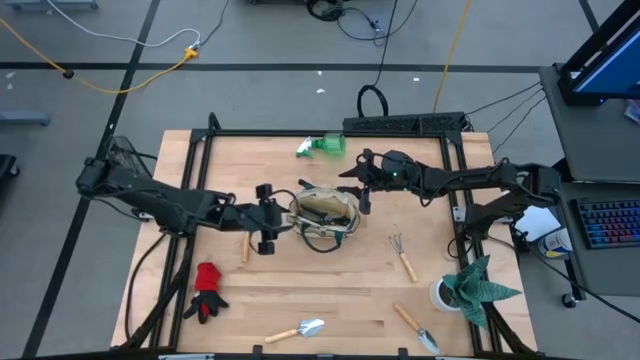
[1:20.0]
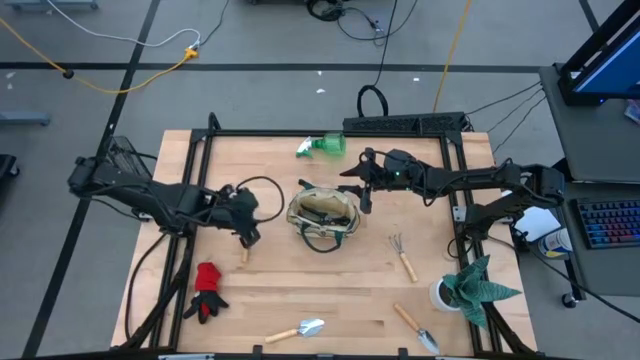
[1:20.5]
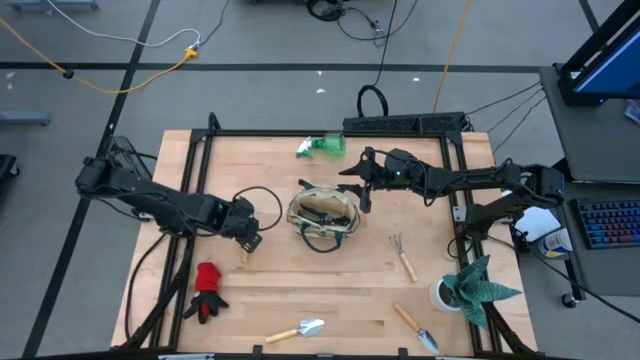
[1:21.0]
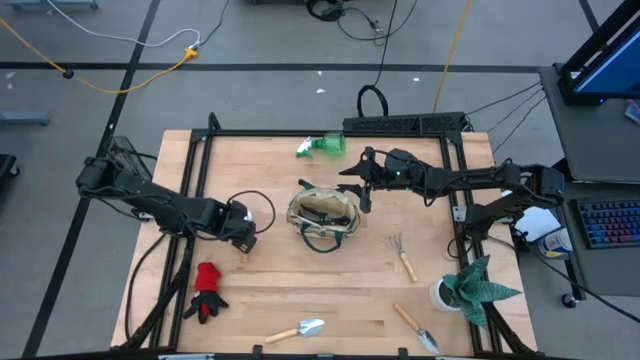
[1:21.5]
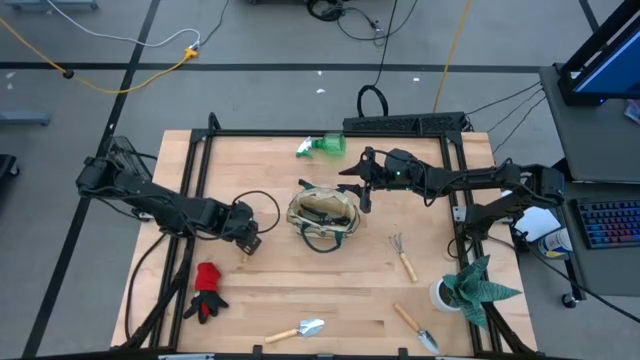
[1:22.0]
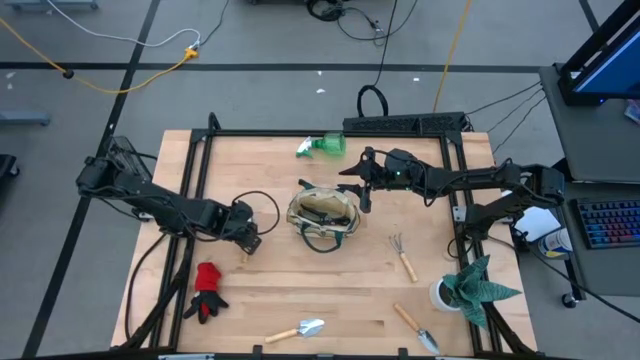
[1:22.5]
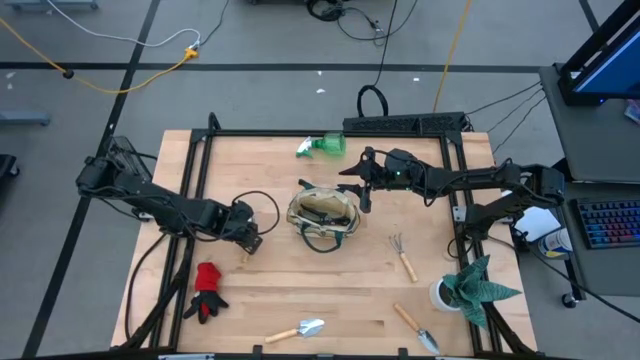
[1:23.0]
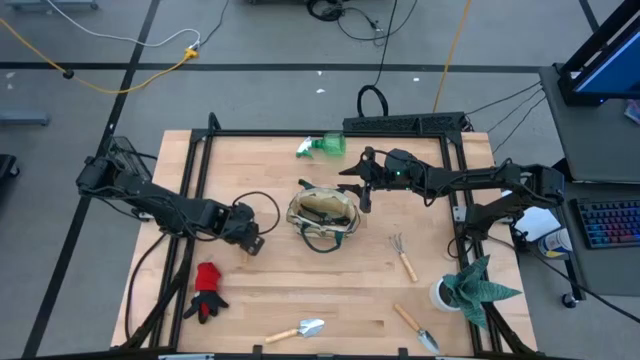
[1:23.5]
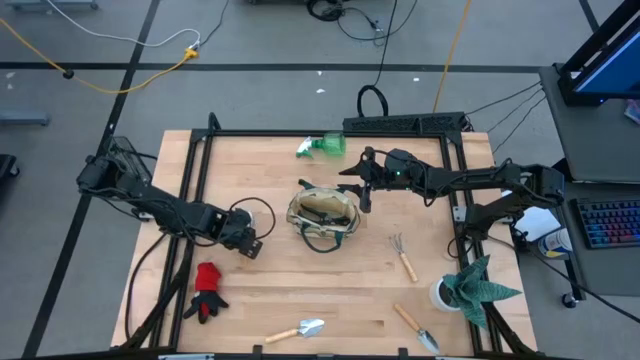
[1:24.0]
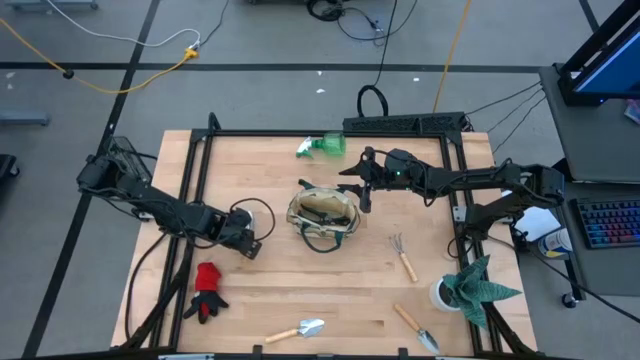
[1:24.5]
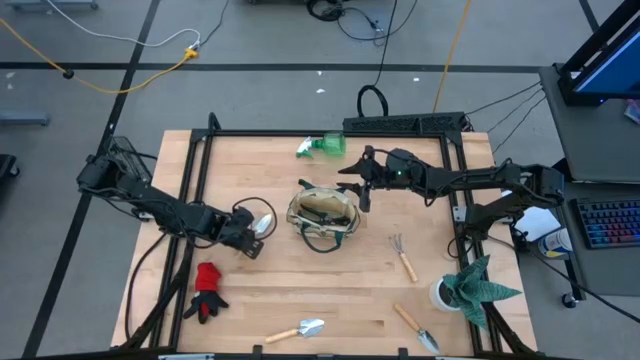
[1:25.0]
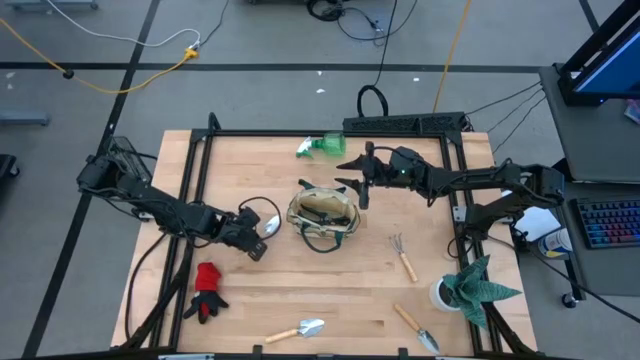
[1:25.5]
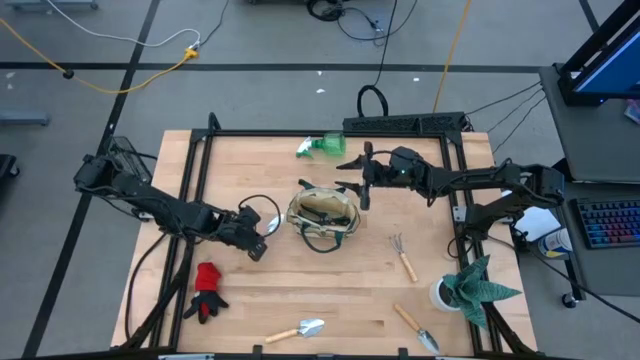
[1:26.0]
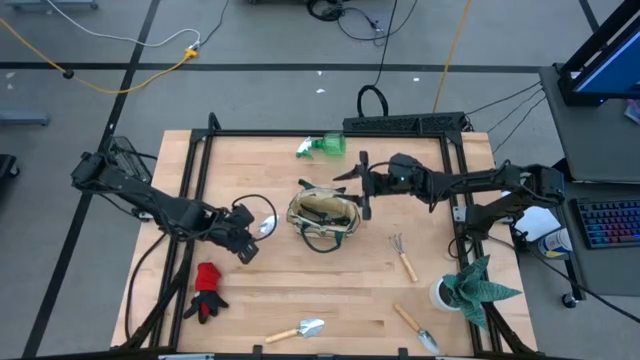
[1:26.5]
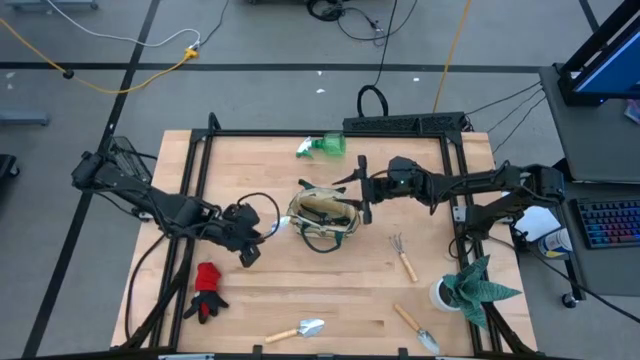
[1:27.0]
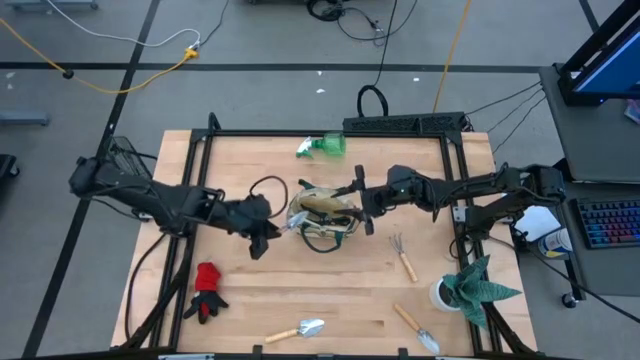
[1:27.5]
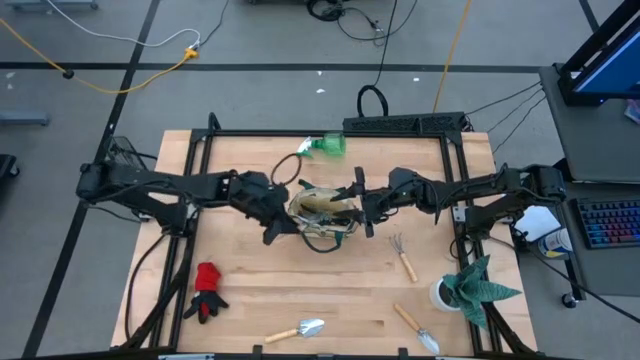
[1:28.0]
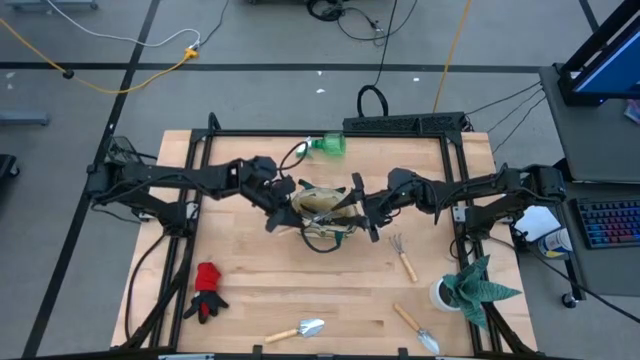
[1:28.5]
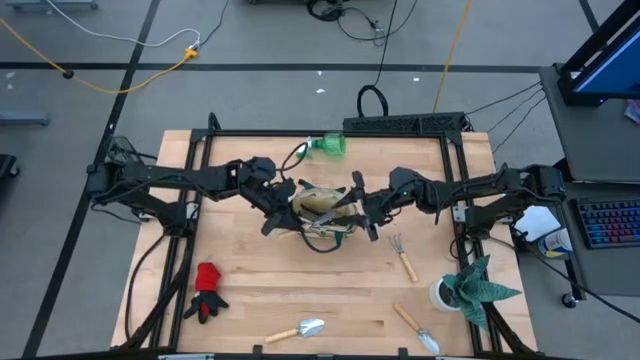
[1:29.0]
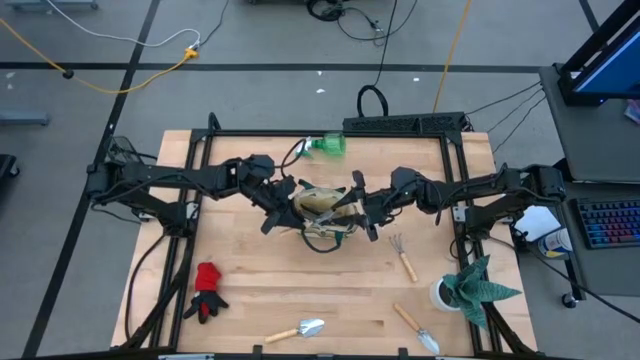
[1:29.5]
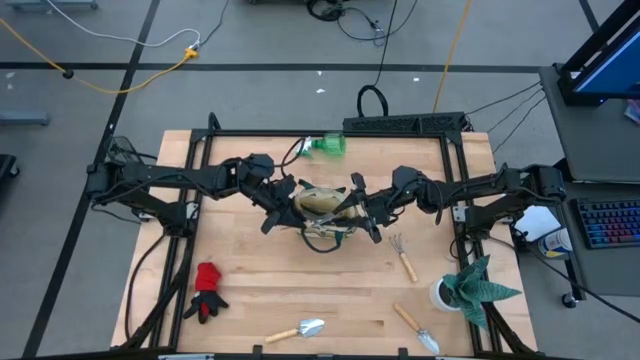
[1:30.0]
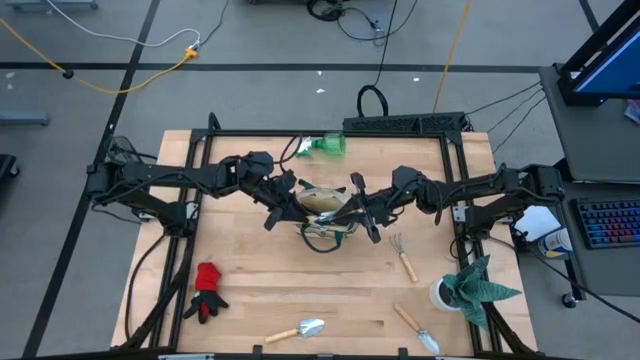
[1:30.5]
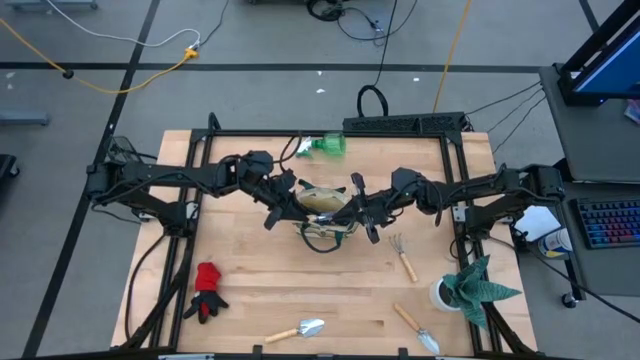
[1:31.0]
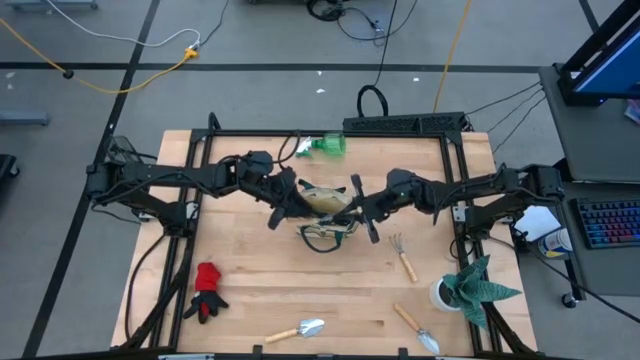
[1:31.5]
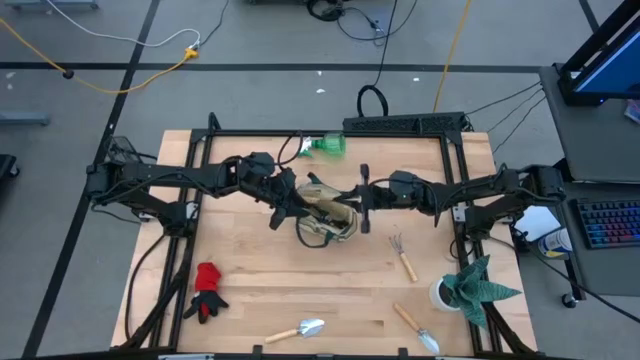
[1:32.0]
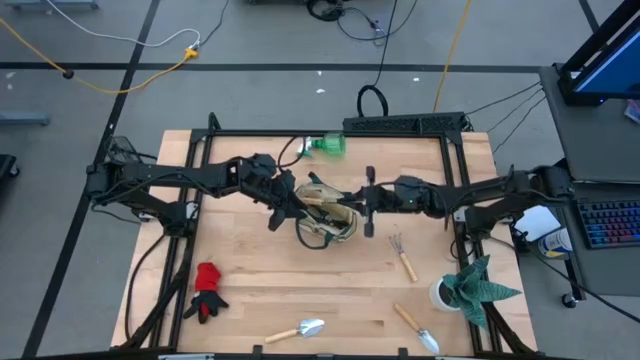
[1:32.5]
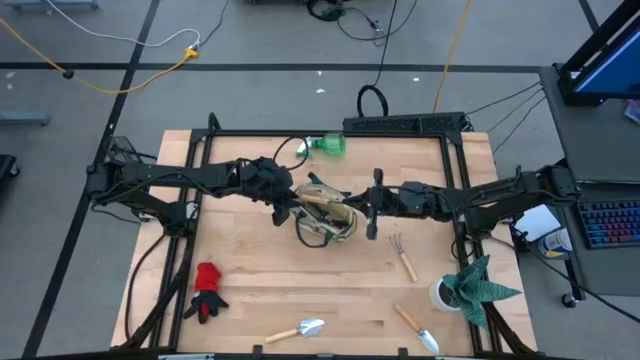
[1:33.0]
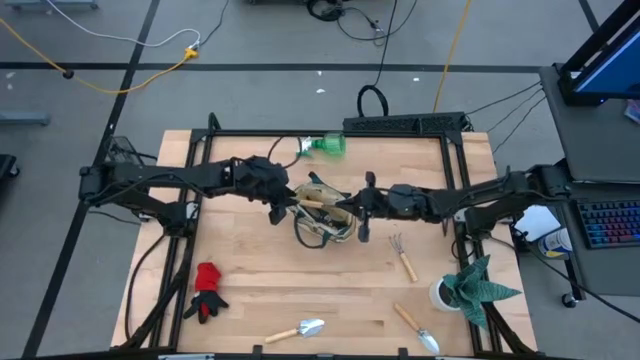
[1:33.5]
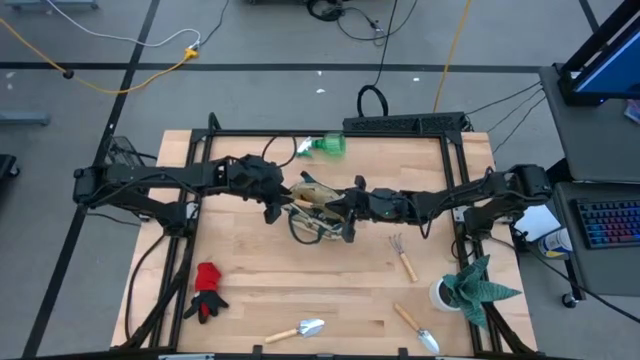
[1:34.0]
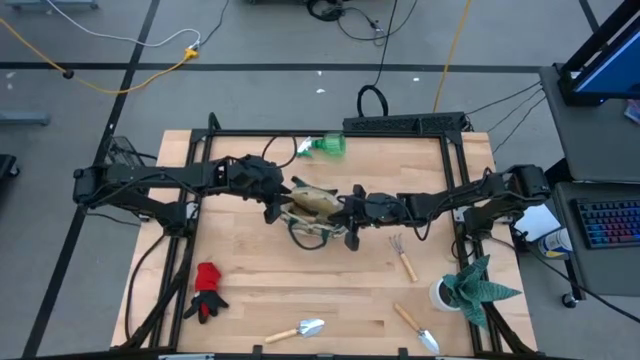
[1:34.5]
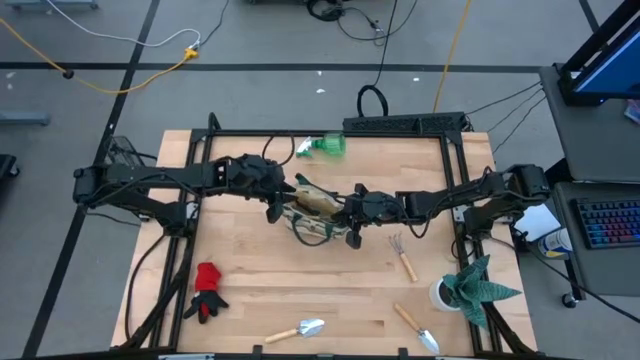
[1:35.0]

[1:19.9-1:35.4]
Task: Pick & Place Garden tools in Gardening bag
Put the top left brown trowel into the brown gardening bag

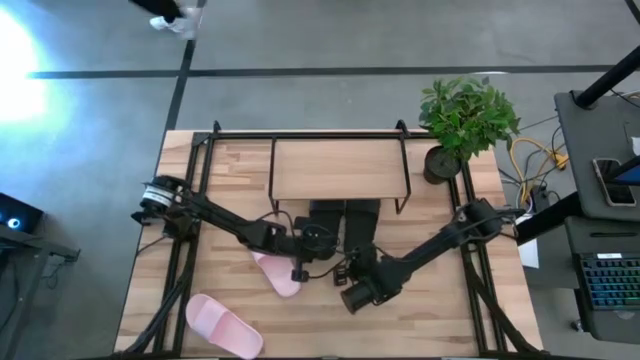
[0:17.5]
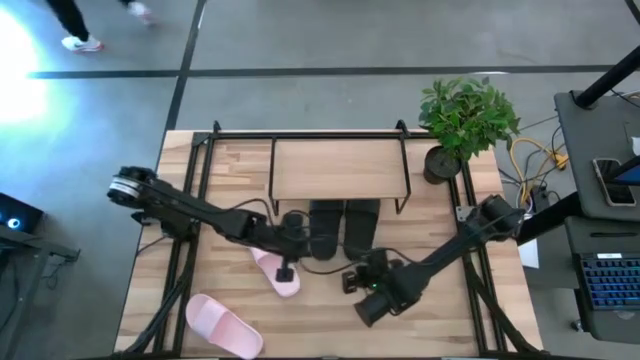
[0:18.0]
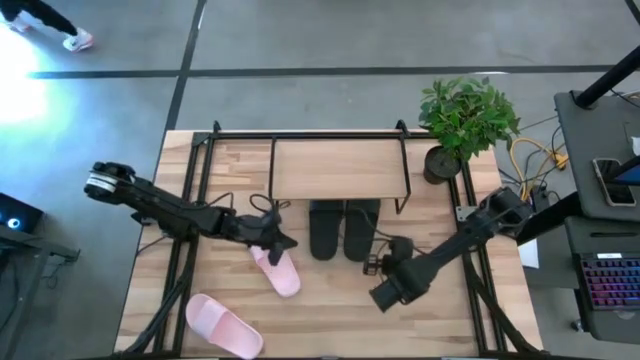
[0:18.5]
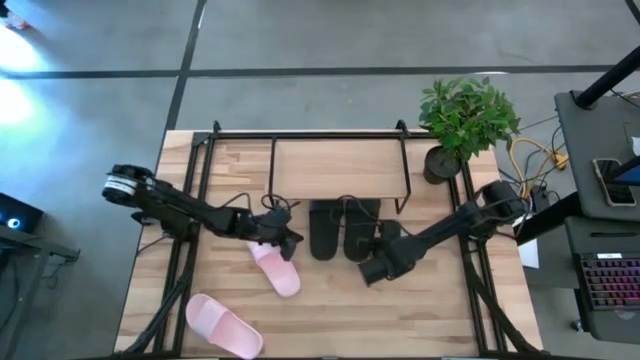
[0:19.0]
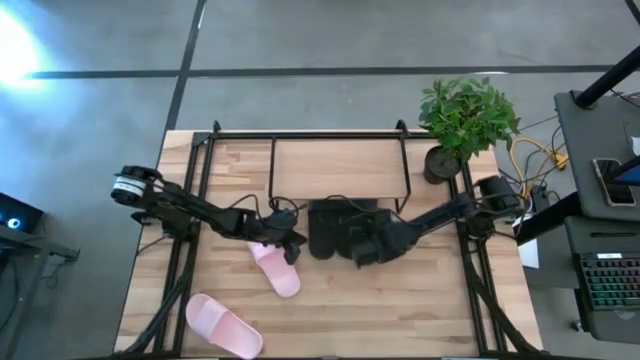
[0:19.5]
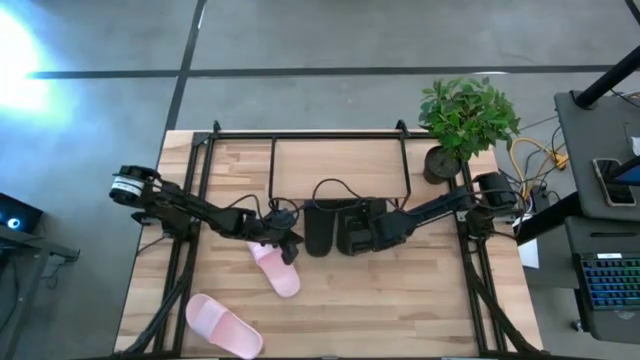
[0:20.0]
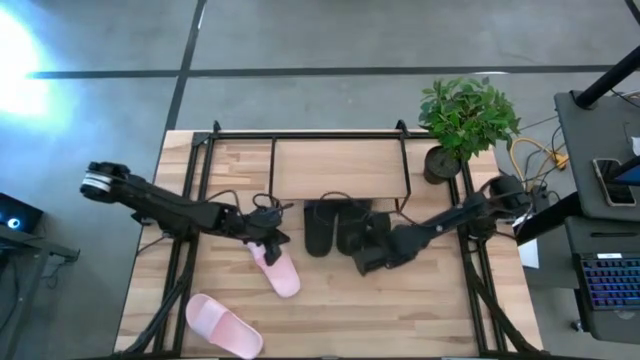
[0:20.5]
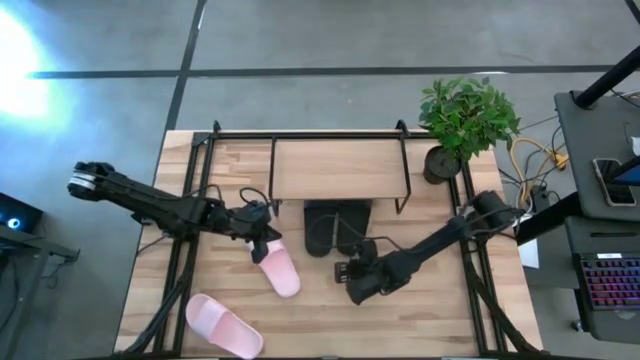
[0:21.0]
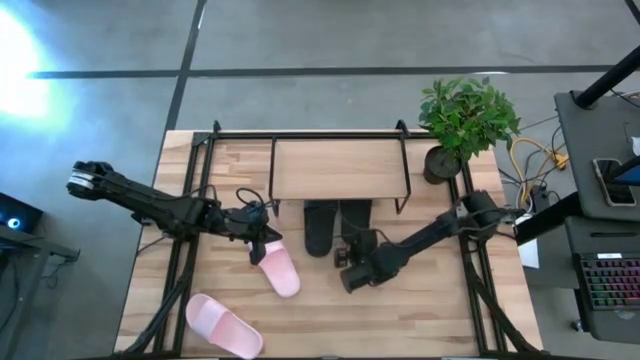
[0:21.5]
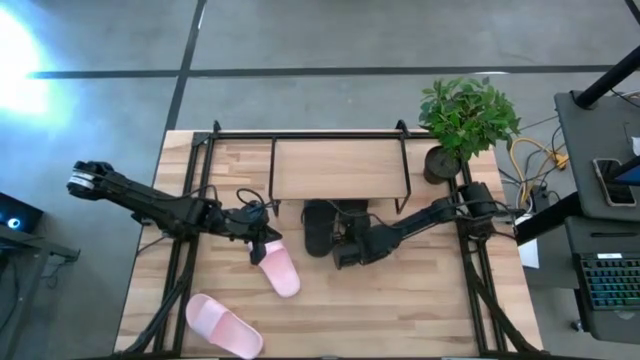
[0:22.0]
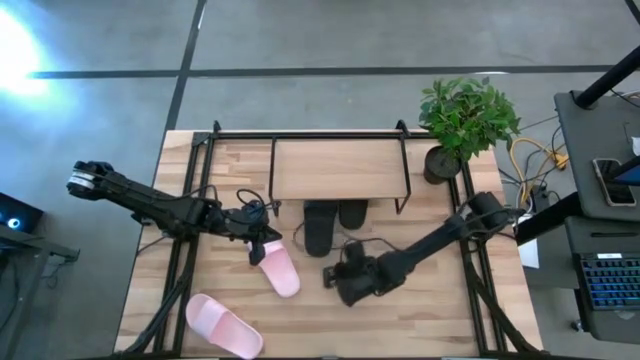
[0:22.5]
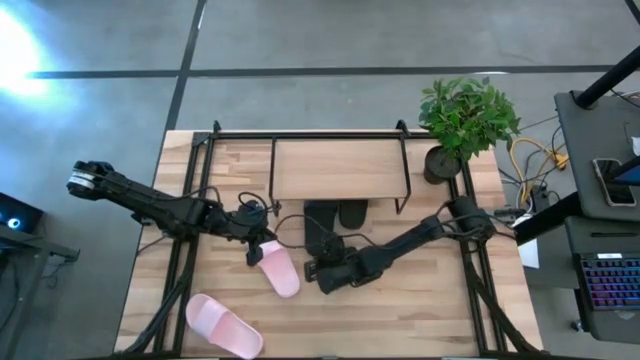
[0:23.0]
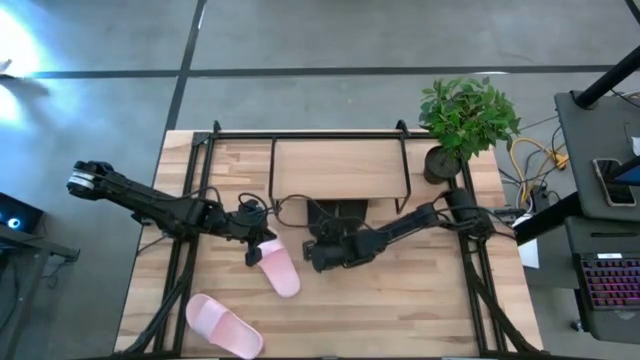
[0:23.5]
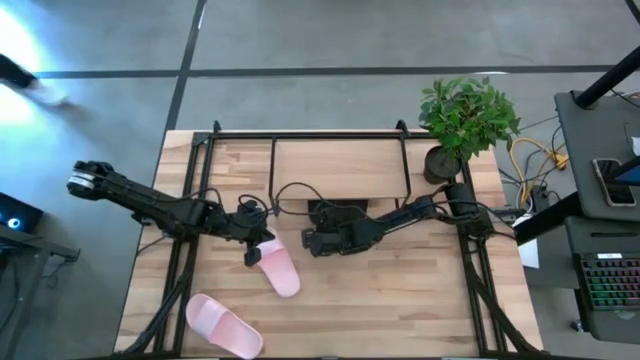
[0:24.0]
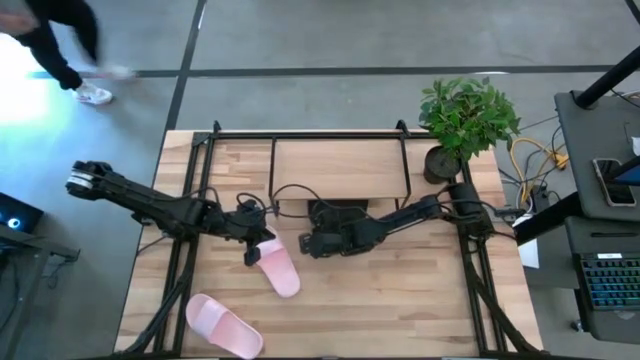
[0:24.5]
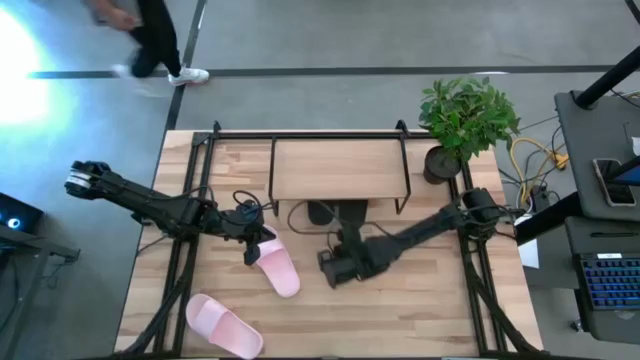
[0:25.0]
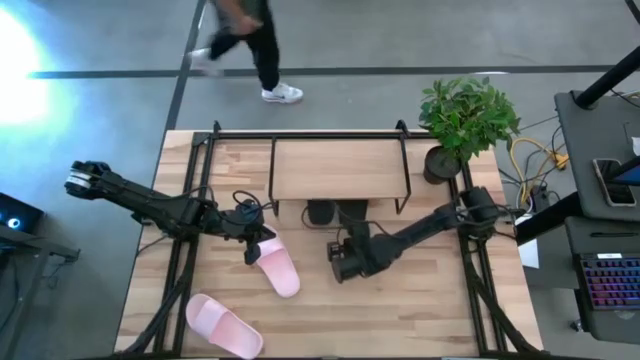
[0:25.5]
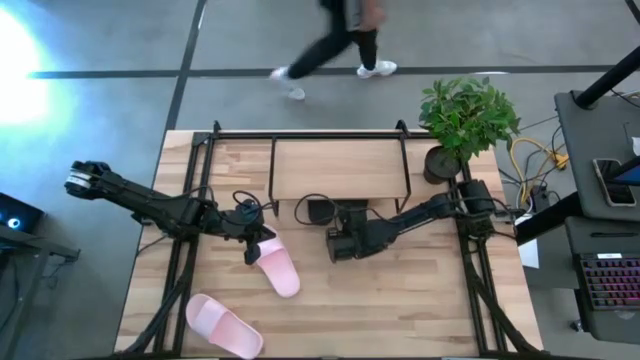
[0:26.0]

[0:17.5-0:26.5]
Task: Pick and place slides into the shelf
Adjust the black slides under the shelf
